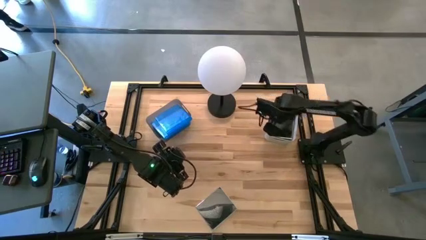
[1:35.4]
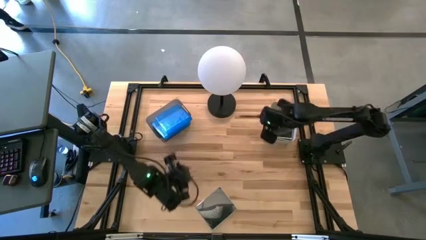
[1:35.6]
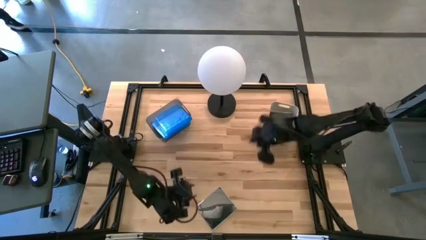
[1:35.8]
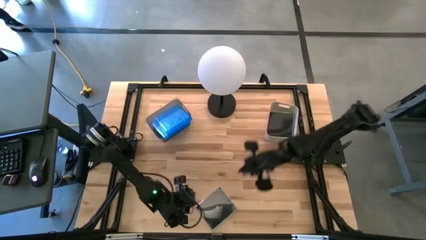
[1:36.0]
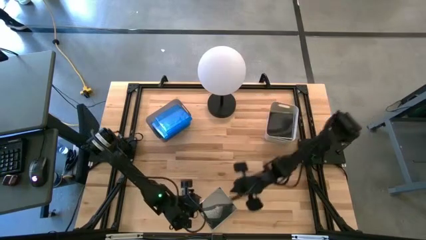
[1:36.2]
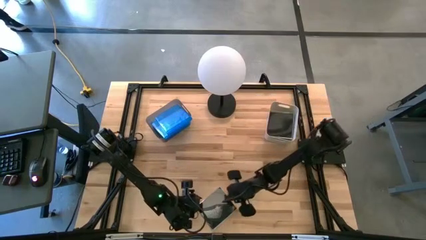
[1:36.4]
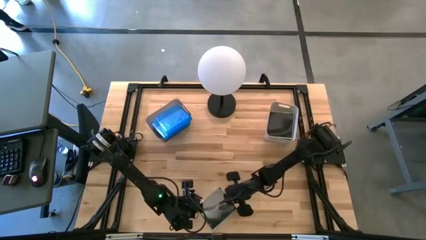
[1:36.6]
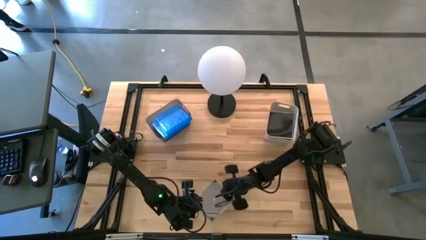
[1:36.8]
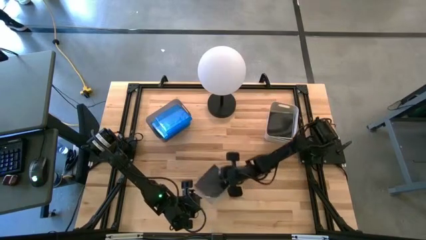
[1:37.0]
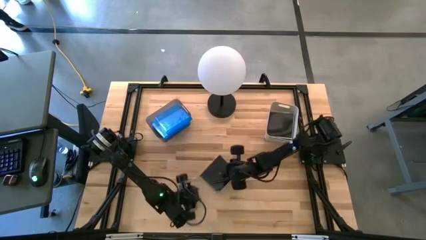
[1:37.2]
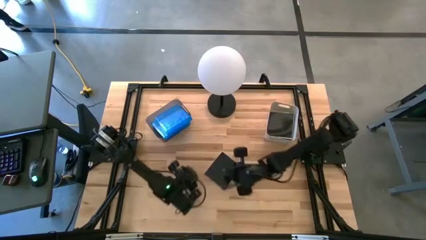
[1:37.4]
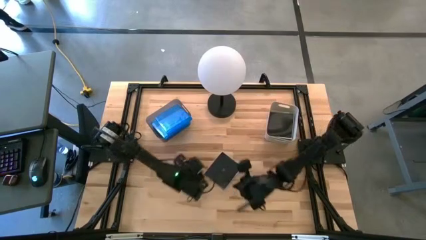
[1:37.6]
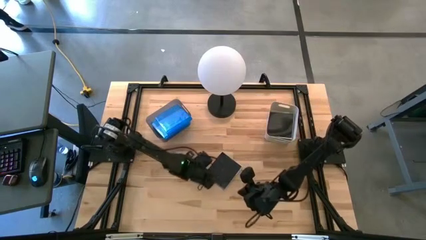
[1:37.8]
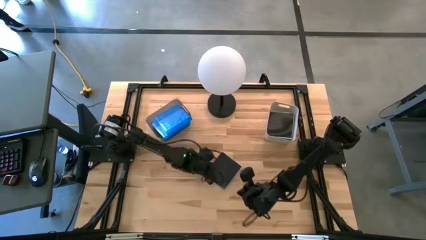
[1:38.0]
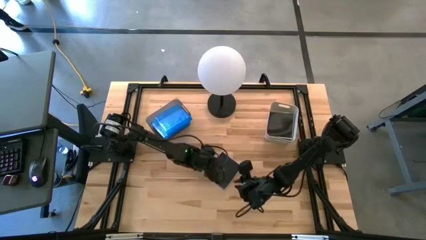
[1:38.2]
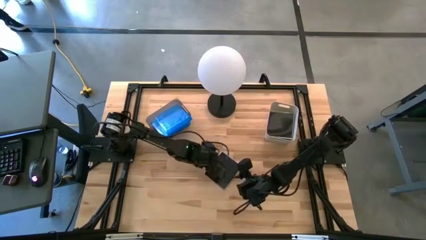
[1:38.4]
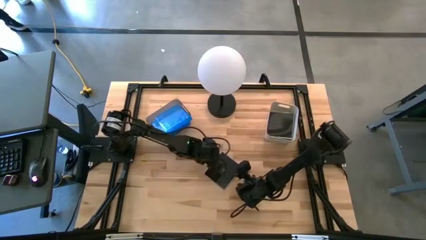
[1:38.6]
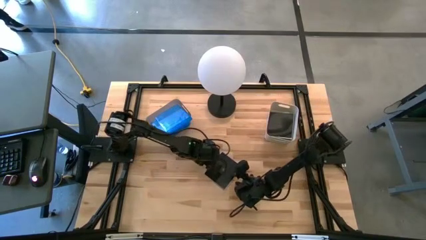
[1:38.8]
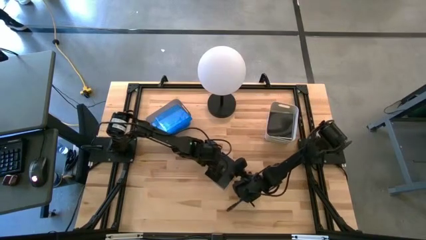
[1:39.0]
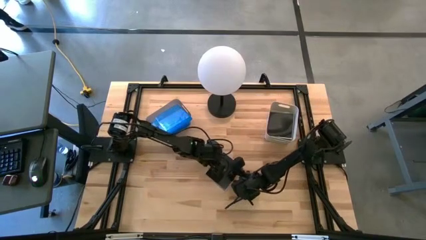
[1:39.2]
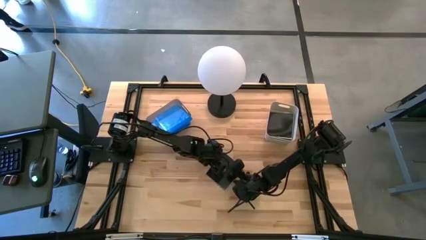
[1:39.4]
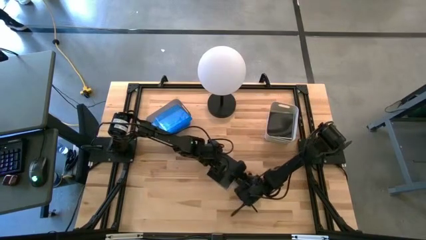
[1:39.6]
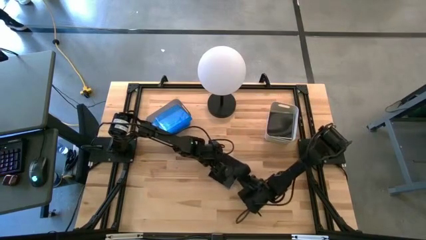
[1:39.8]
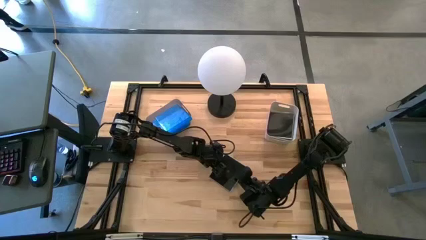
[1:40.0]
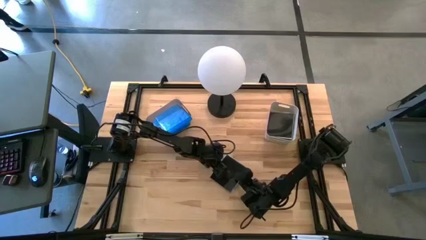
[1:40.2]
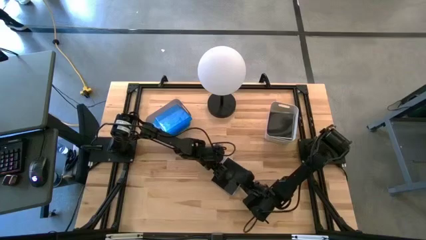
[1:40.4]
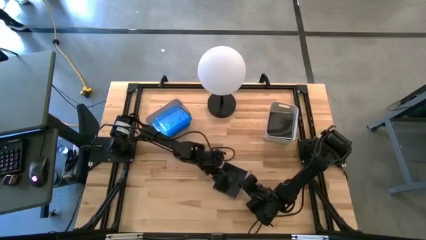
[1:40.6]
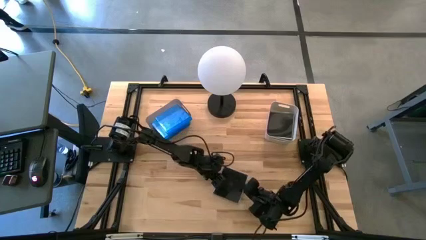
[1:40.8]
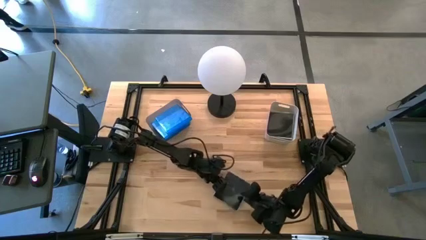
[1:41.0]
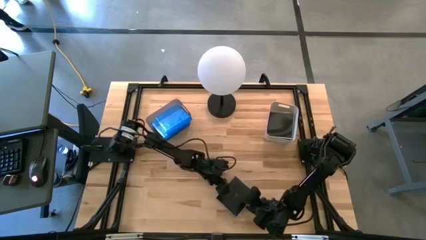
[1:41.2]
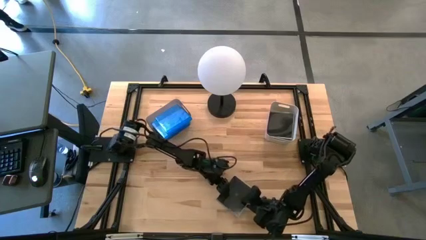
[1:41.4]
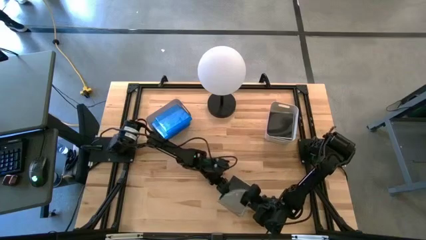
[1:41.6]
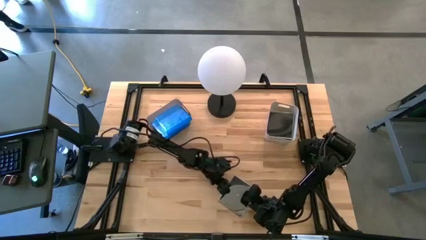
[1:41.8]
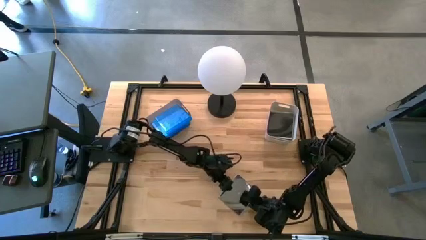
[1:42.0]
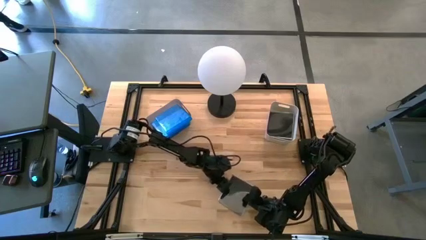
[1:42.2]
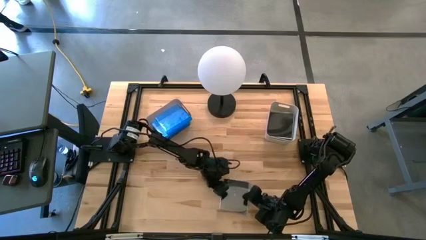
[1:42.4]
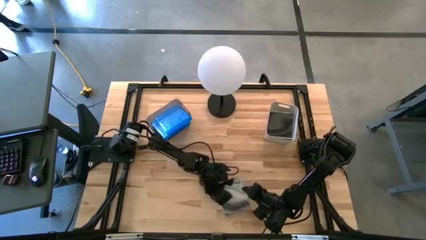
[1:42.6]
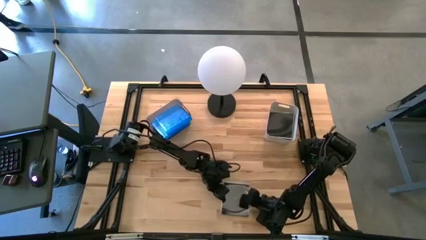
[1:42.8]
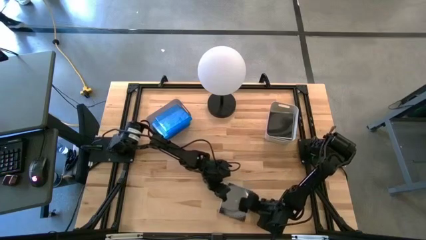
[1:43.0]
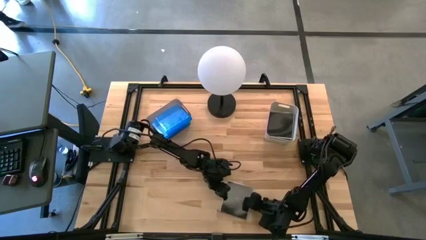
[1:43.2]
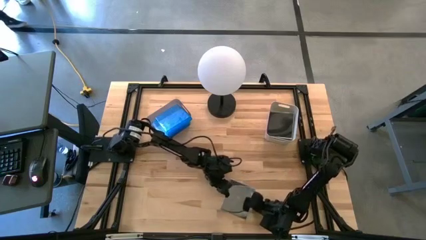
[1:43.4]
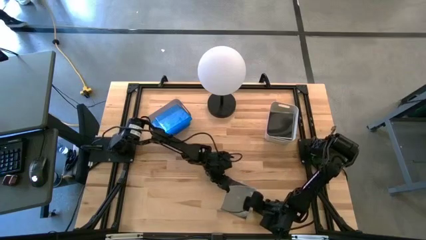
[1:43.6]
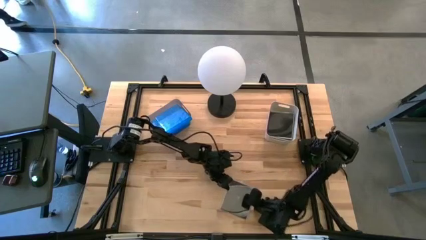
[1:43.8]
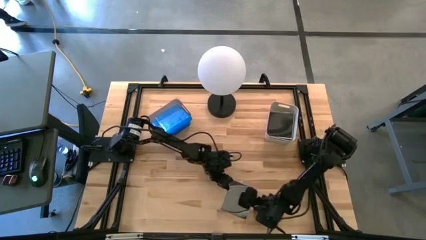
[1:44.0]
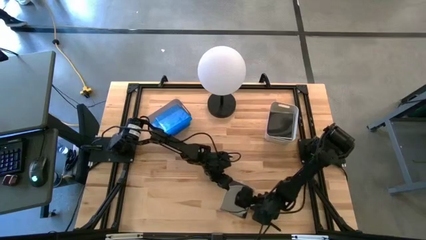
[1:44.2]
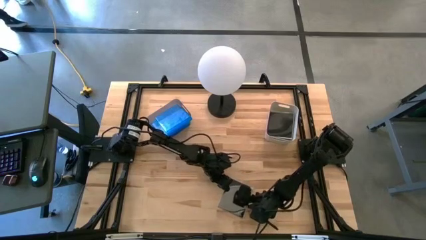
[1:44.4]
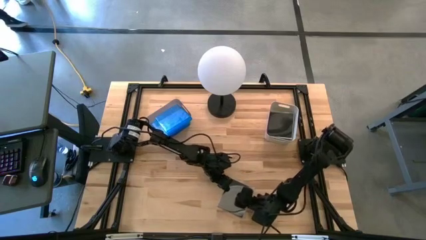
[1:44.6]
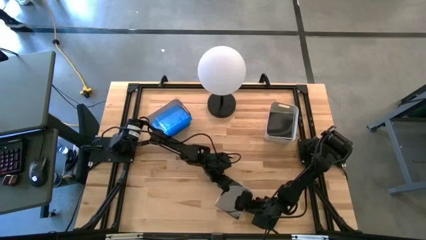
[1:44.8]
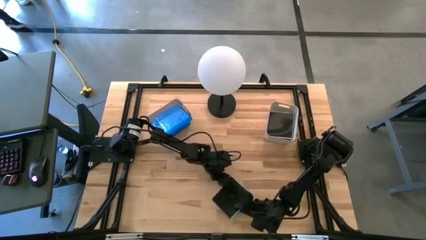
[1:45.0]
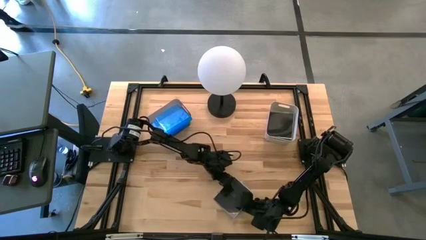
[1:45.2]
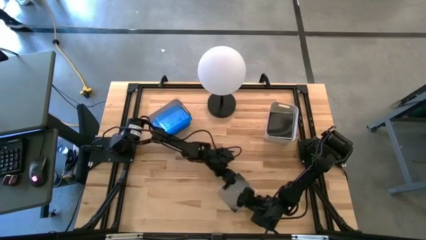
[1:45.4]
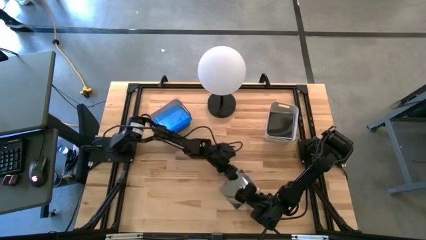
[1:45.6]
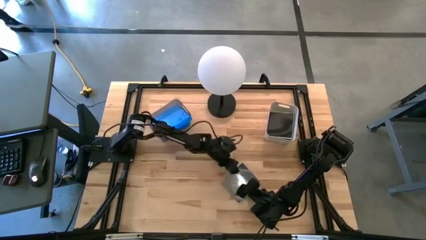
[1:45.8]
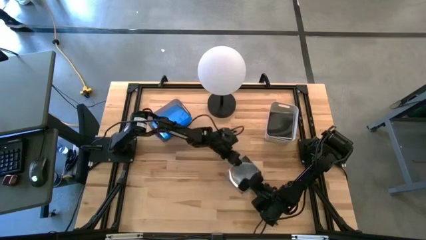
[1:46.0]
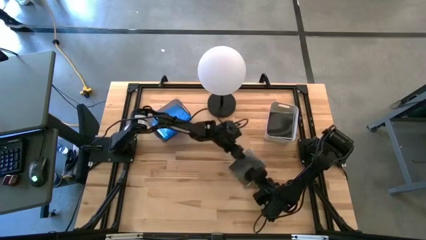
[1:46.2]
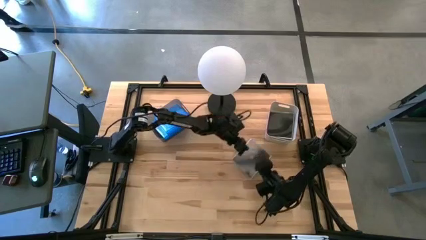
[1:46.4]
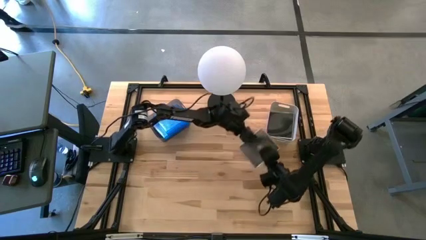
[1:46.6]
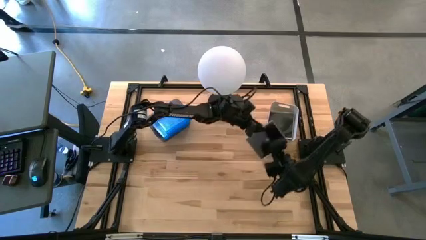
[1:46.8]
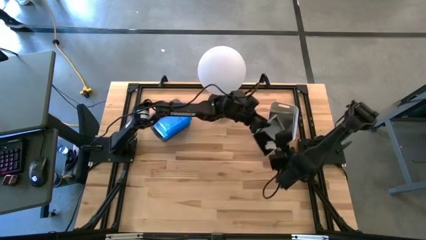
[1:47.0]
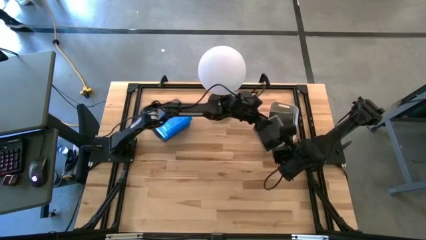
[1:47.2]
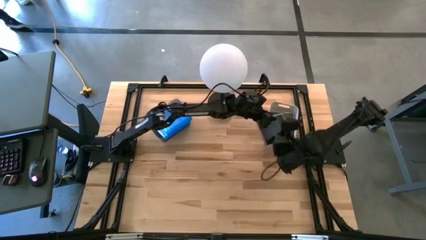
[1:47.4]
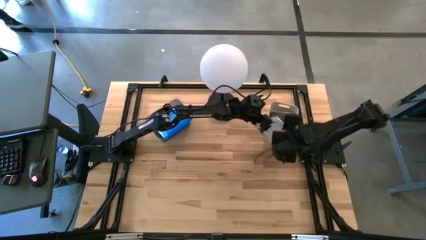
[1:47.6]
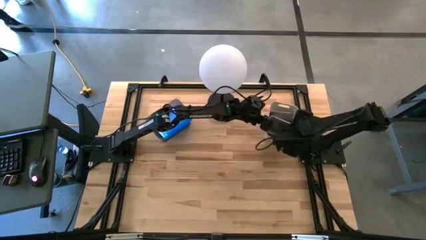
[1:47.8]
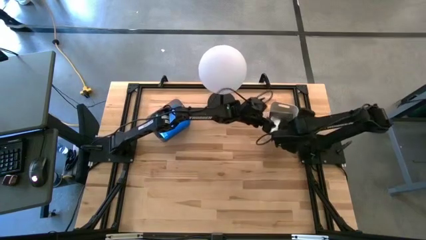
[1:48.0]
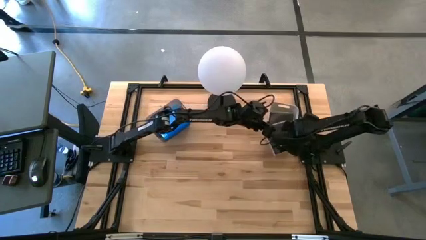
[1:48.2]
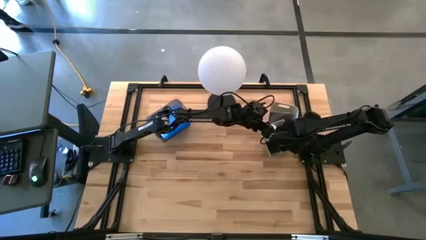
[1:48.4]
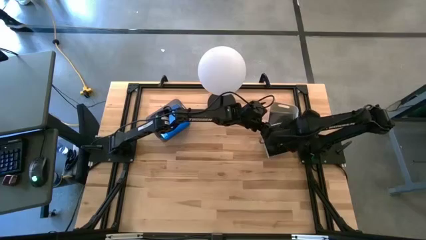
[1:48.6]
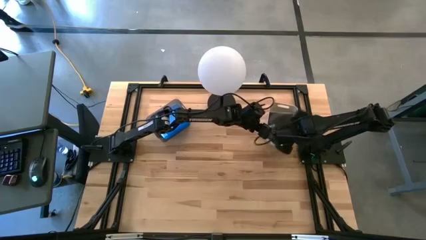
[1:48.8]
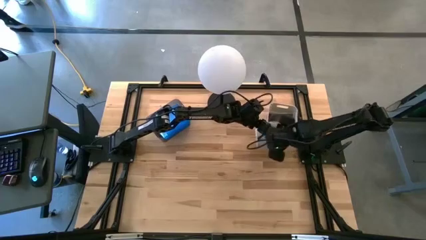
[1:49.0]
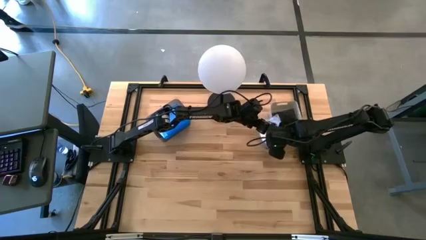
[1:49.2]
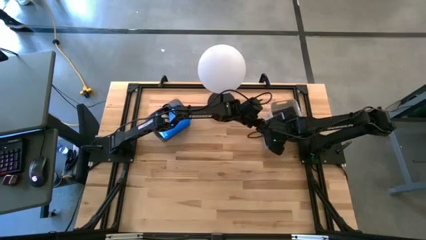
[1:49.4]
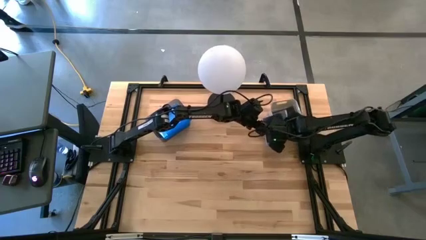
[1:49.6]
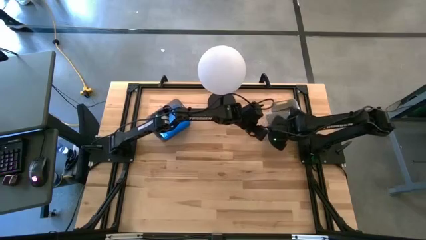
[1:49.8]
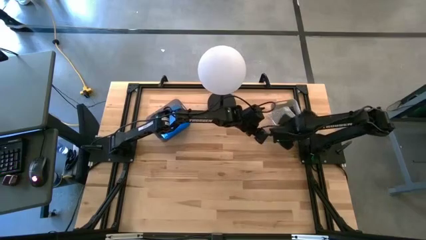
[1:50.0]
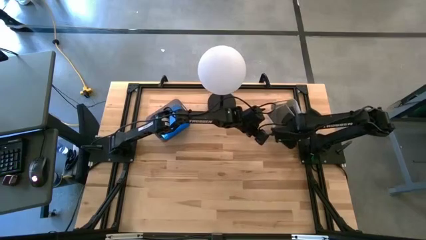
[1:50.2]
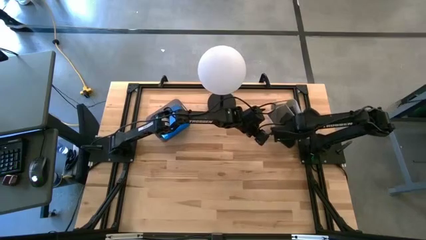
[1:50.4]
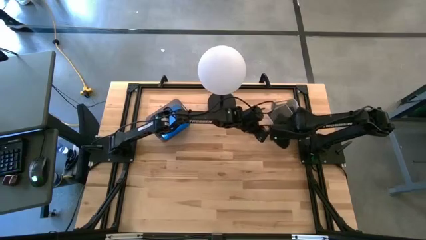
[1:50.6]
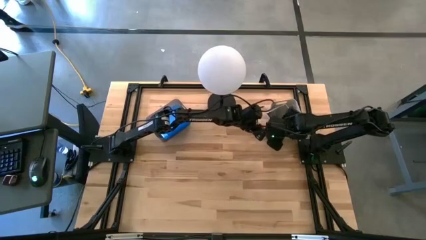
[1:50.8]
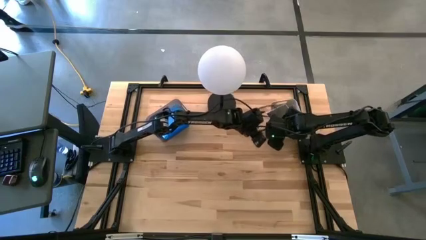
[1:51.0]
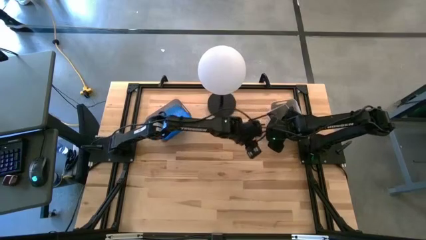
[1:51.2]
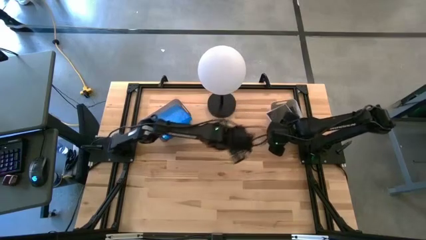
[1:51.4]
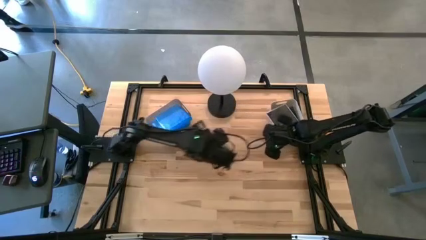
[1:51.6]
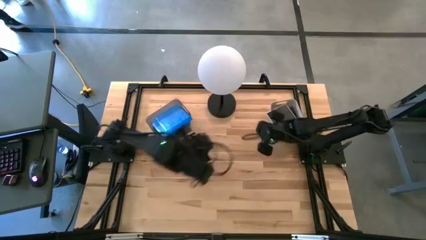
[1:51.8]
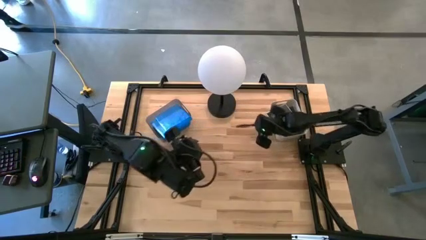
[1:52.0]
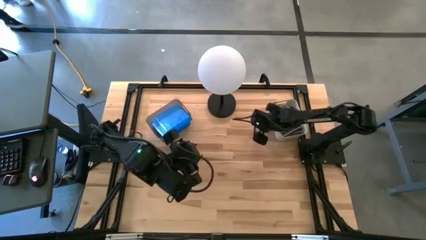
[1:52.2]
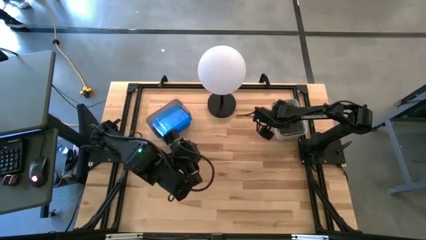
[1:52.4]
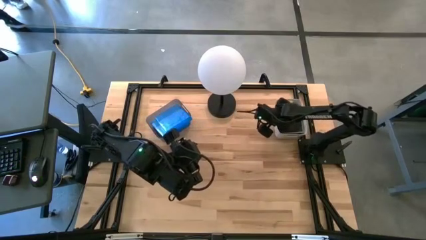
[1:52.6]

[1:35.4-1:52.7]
Task: Pick & place jewel cases by type
Put the black CD case into the gray bin
